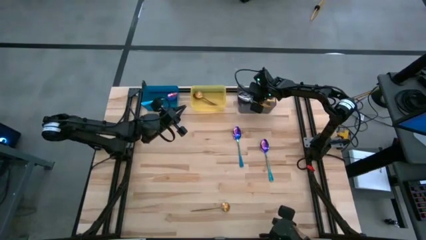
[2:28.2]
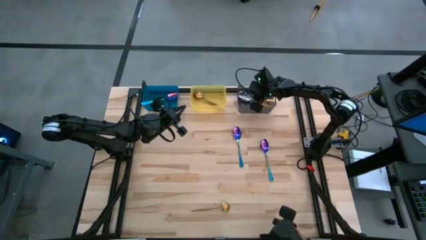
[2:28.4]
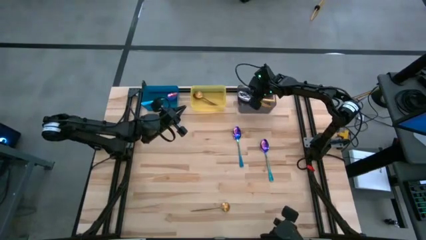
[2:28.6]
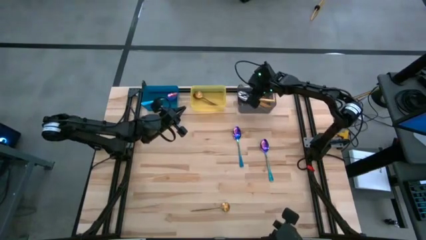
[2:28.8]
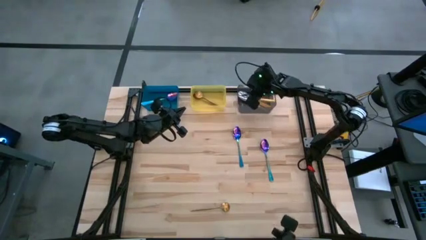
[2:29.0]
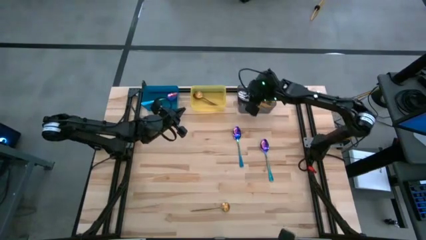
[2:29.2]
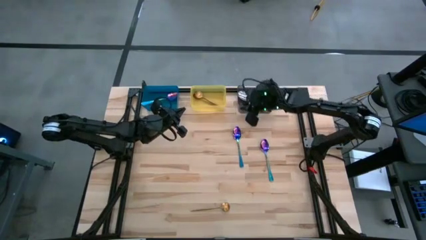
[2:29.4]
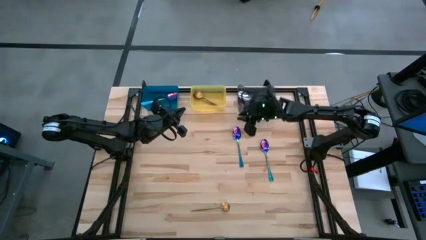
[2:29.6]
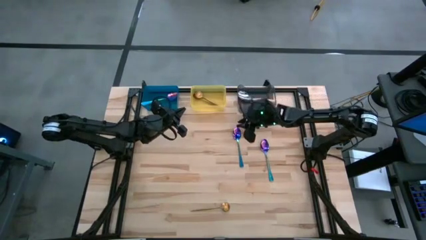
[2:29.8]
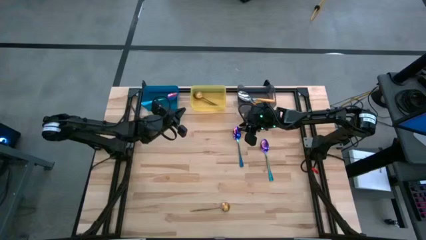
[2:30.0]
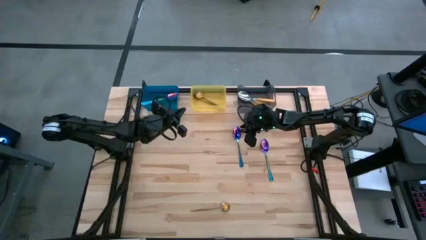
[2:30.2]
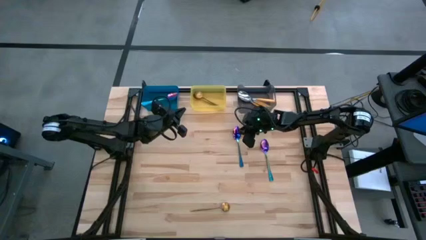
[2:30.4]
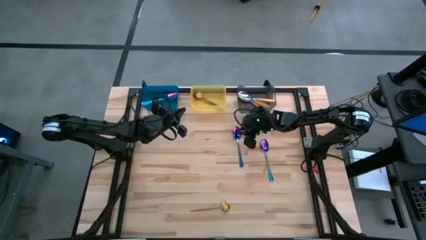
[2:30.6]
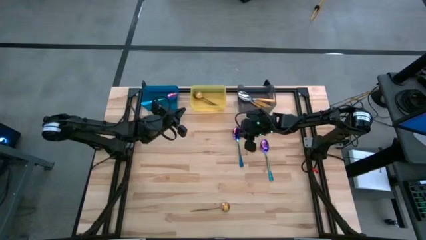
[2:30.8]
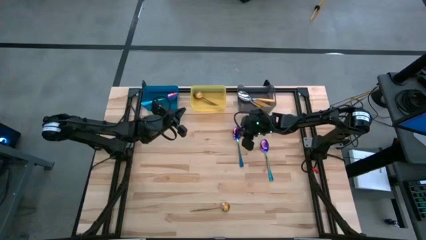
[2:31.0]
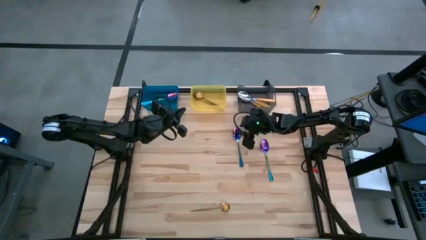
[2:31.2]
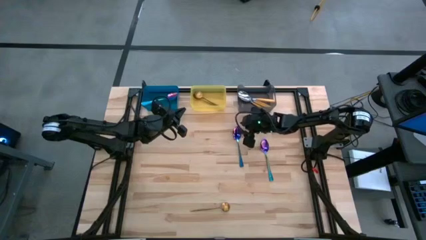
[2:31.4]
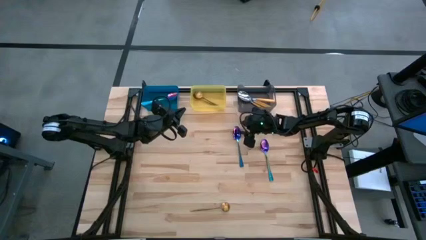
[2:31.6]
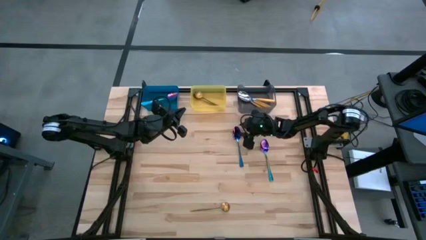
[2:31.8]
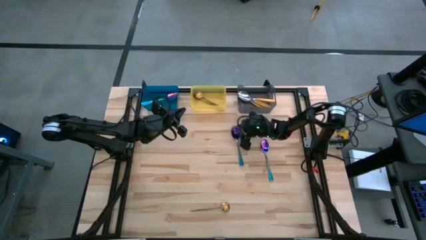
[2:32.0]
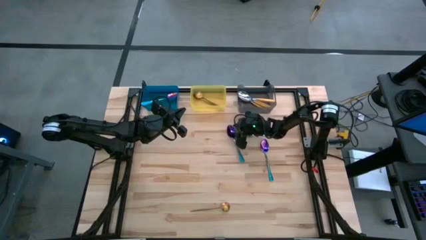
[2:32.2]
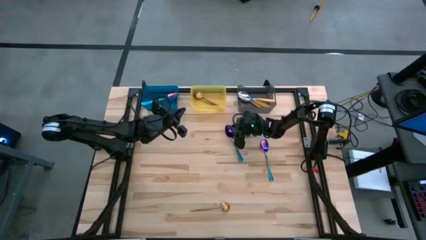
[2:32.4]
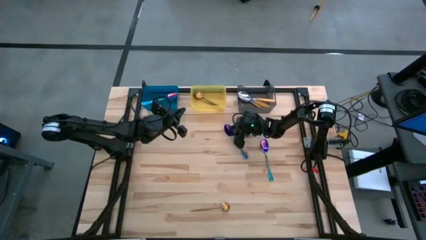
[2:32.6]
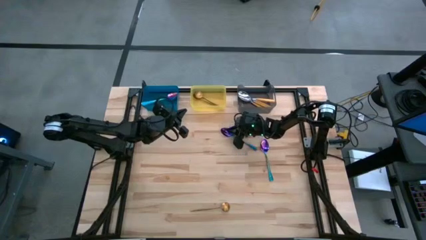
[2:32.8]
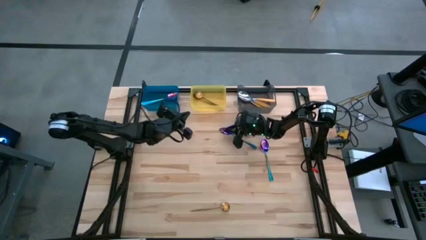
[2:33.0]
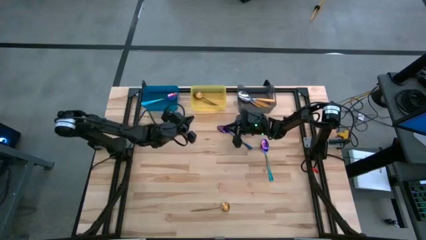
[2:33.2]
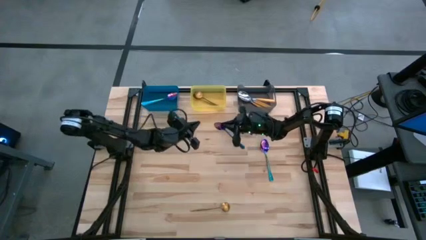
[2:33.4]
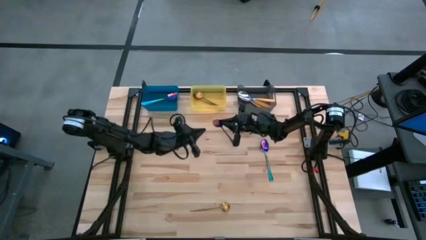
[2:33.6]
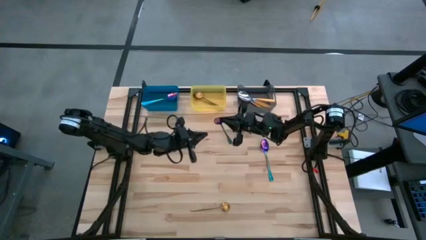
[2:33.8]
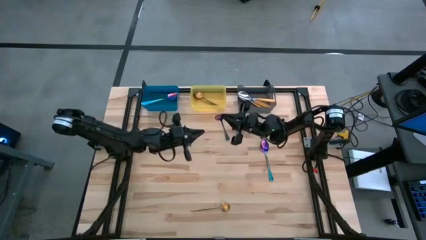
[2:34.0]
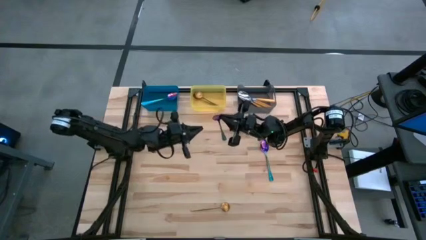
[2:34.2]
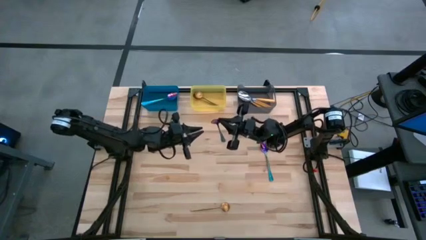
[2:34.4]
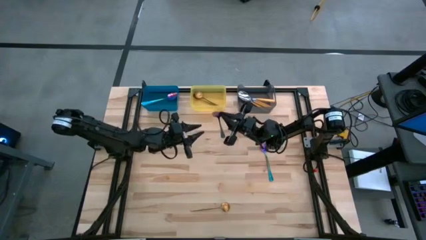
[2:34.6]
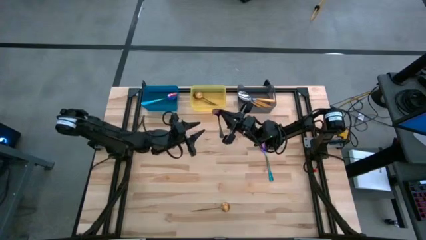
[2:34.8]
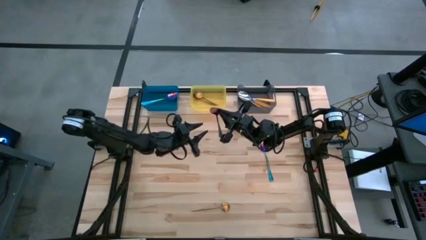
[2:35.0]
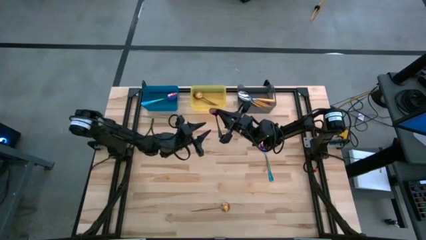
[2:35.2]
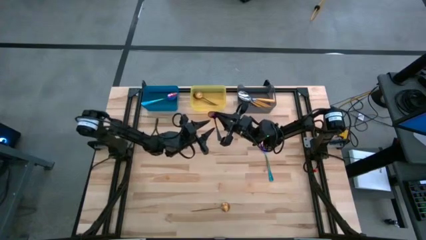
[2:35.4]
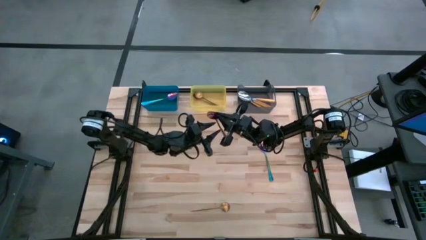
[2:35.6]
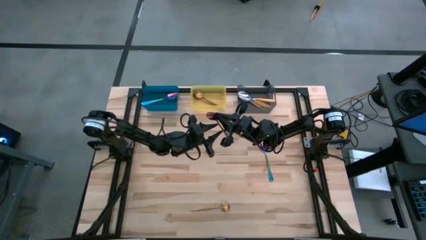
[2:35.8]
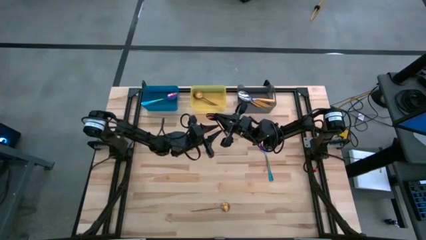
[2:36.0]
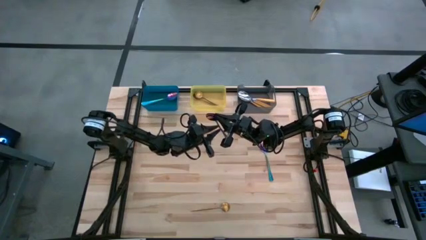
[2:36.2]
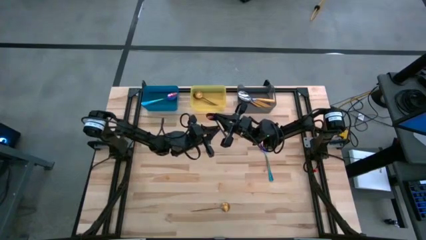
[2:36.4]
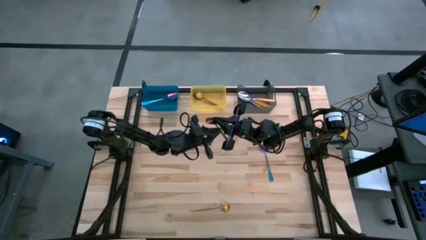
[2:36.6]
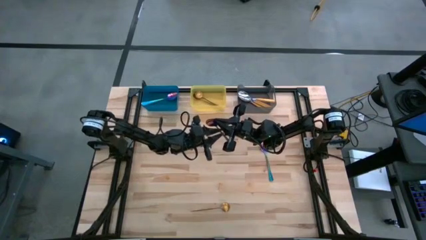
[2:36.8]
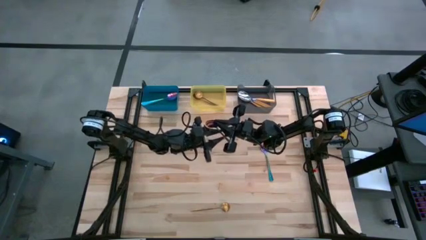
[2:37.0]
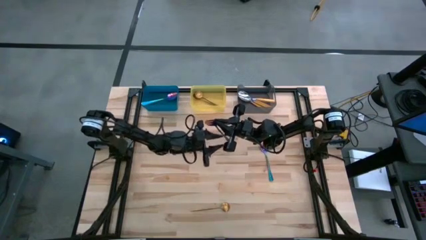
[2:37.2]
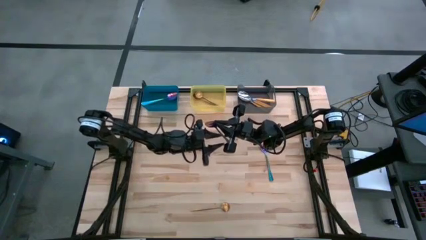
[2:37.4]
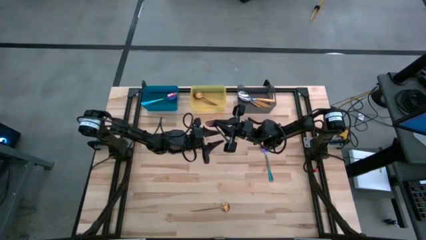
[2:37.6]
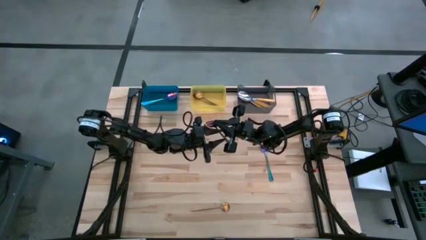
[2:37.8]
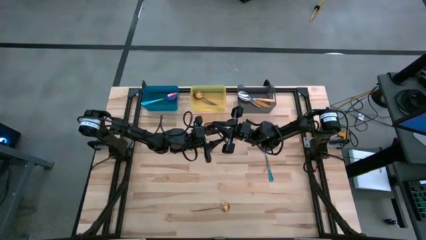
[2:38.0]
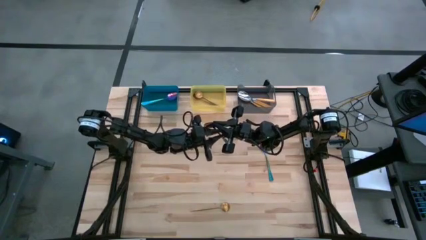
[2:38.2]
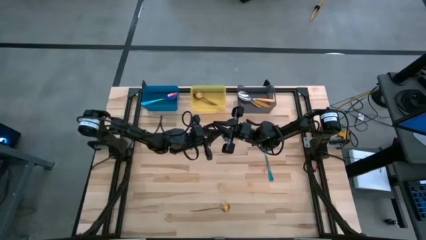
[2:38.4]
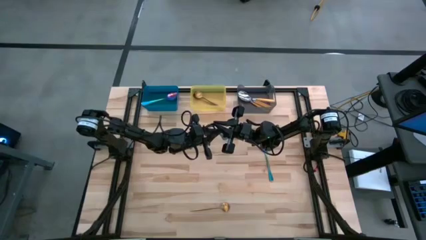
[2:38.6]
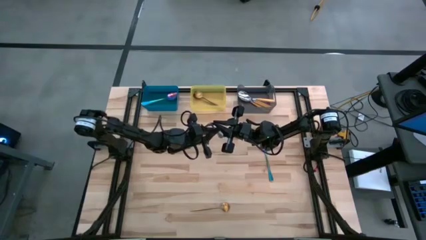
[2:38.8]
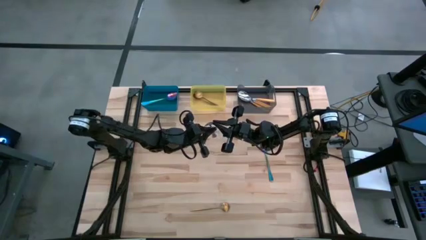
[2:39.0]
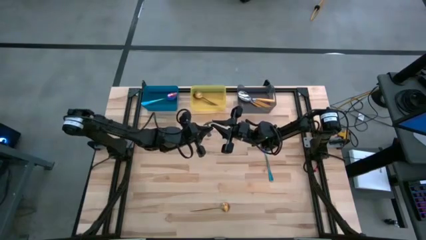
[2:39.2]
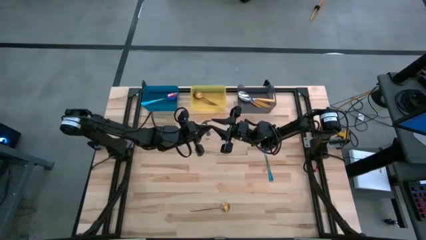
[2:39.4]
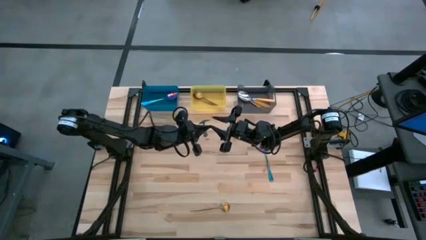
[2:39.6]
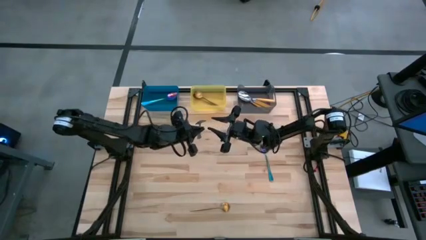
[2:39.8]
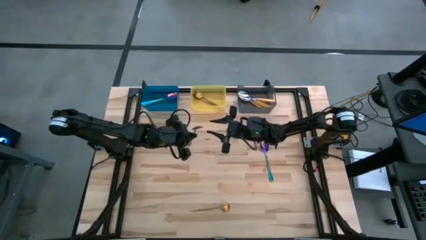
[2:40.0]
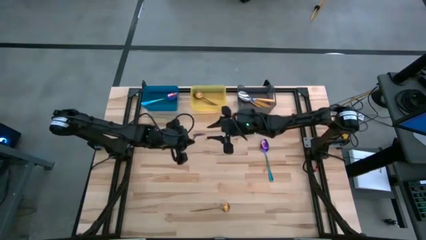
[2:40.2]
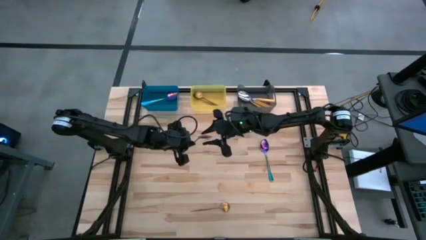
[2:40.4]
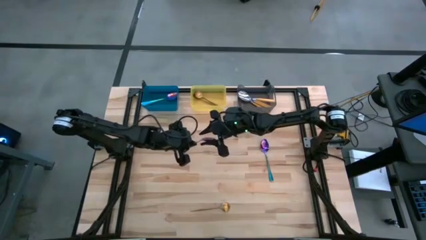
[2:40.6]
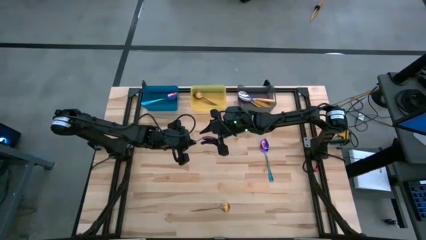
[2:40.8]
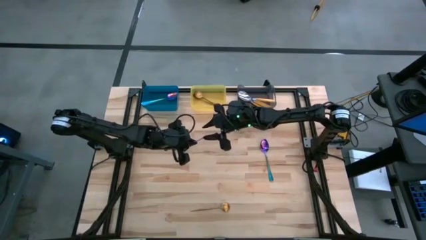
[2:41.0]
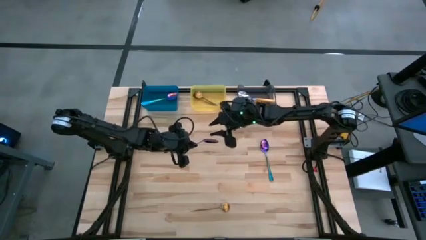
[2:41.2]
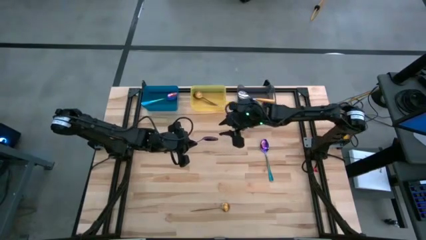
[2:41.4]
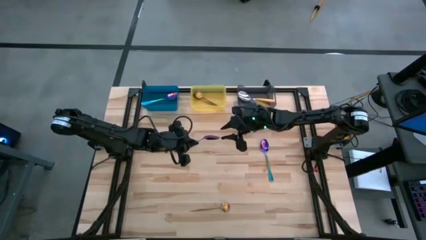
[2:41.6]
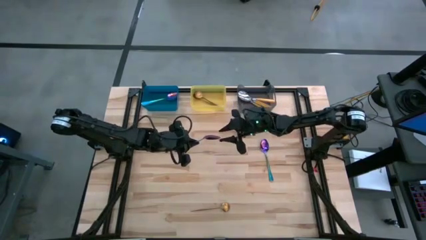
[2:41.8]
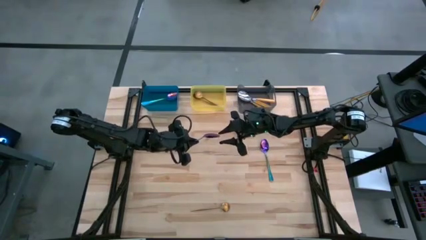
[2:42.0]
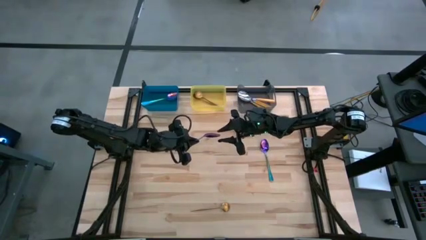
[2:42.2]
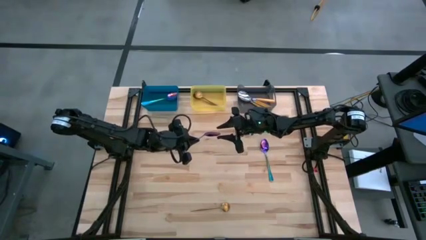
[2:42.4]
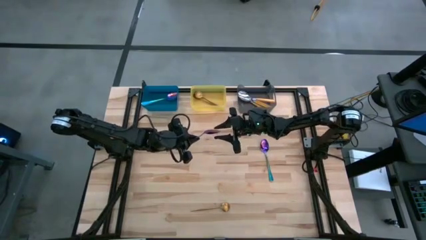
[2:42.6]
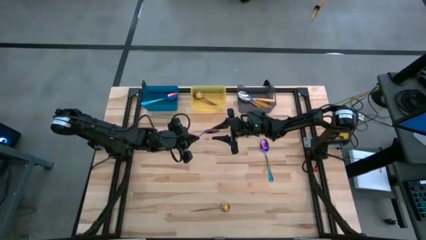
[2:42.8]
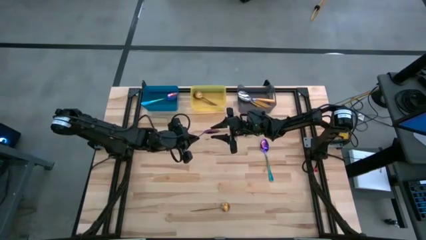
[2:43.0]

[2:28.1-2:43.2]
Task: Sort silverware by color (type)
Put the blue spoon into the blue bin

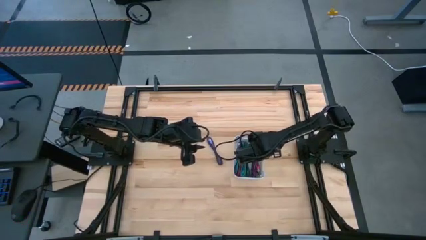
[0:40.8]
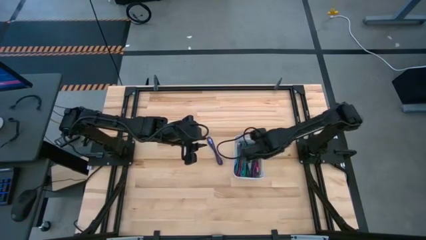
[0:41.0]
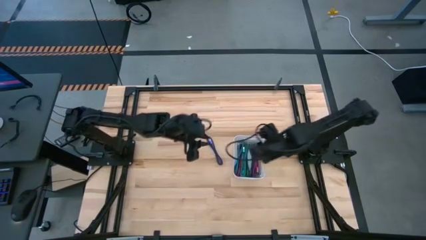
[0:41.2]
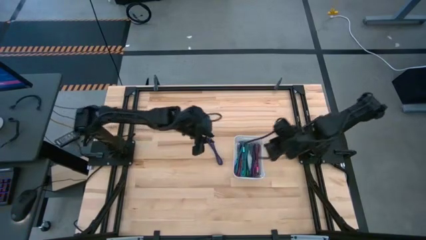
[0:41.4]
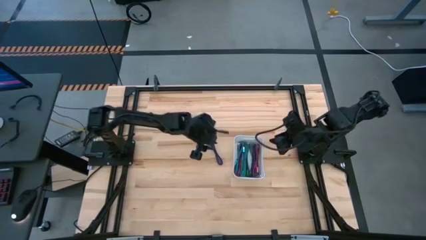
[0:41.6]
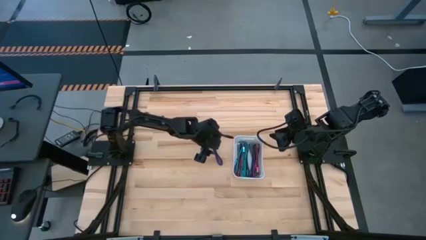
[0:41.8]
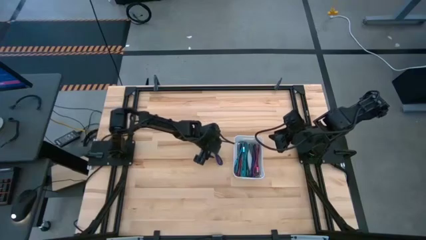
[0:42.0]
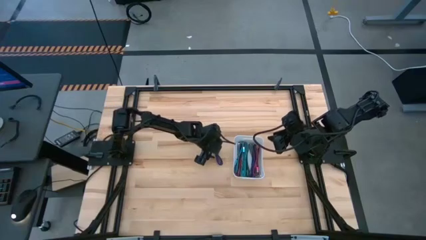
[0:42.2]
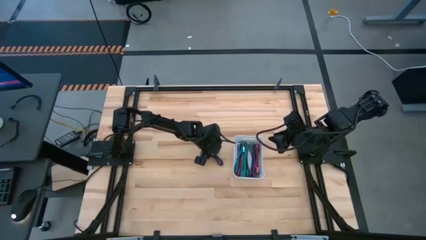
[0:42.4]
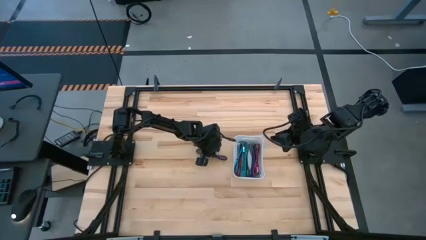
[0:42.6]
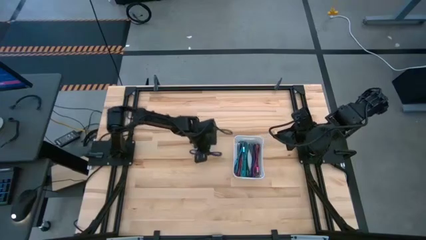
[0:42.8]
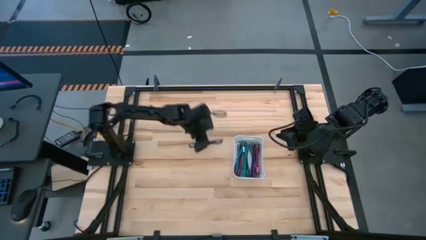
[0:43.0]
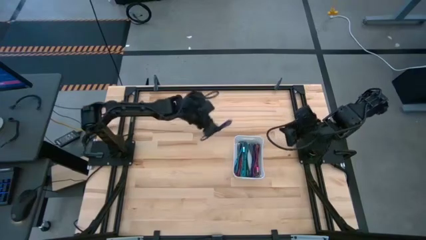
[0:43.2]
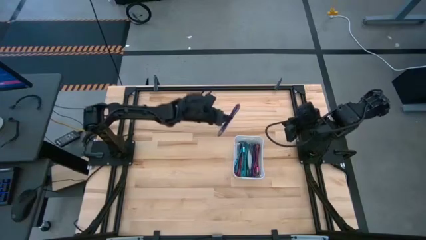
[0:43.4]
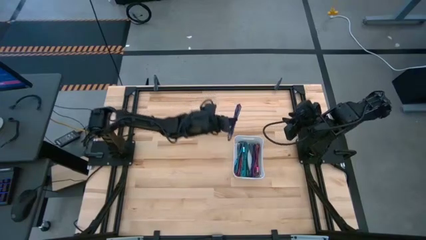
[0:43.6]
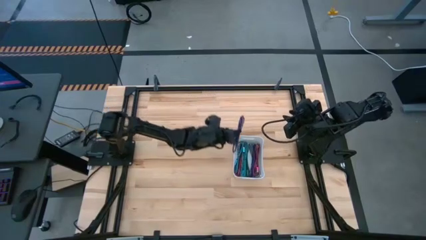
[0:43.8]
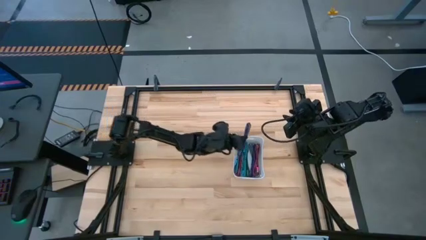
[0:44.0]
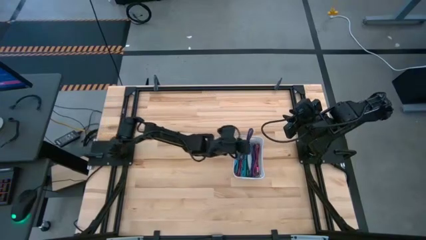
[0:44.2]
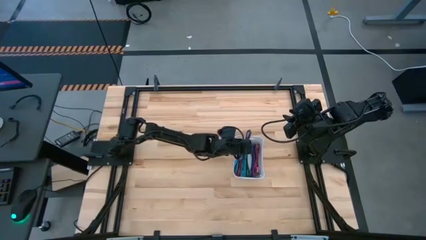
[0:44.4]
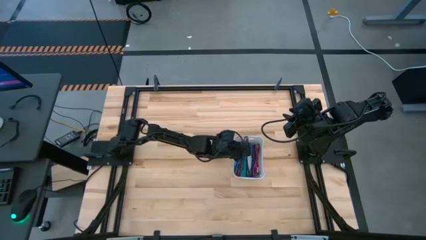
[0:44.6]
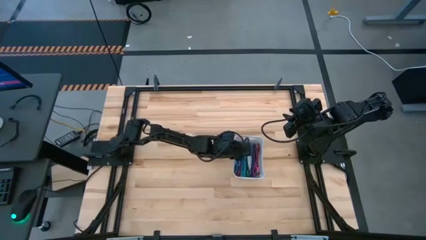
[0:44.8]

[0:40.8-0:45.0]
Task: Pick and place USB-C Cables
Put the violet charger cable into the white bin
